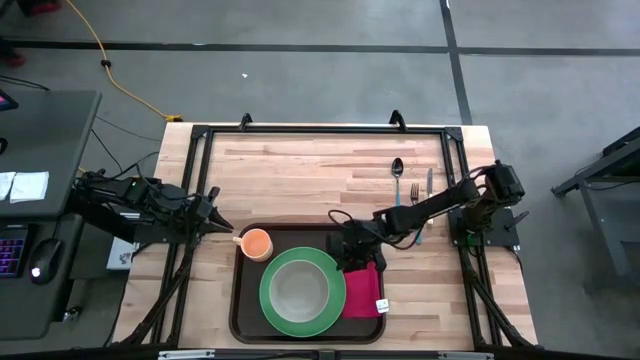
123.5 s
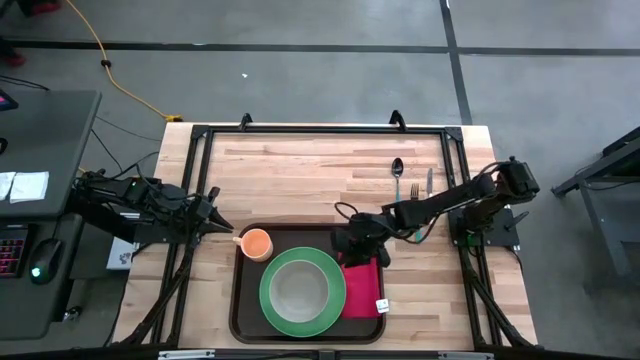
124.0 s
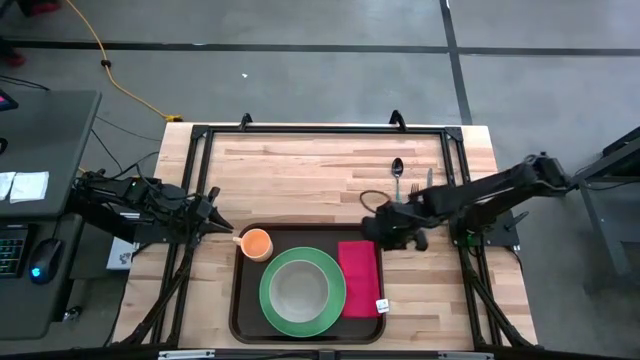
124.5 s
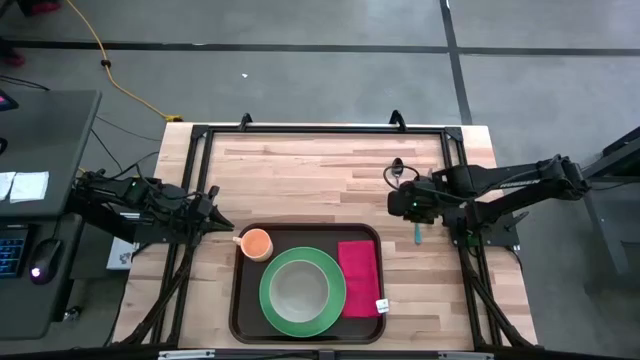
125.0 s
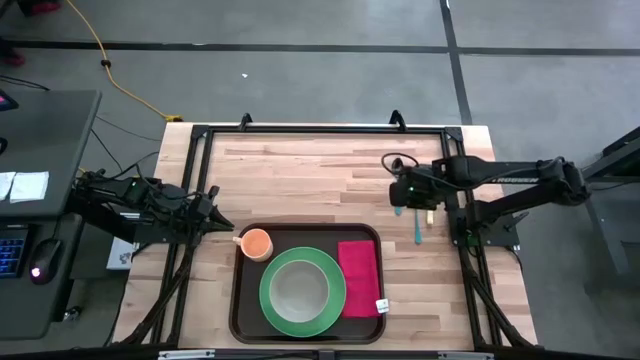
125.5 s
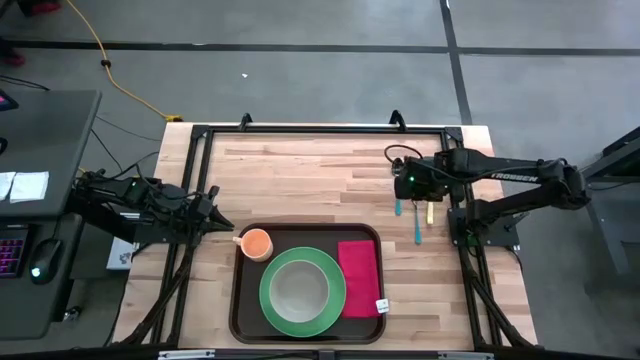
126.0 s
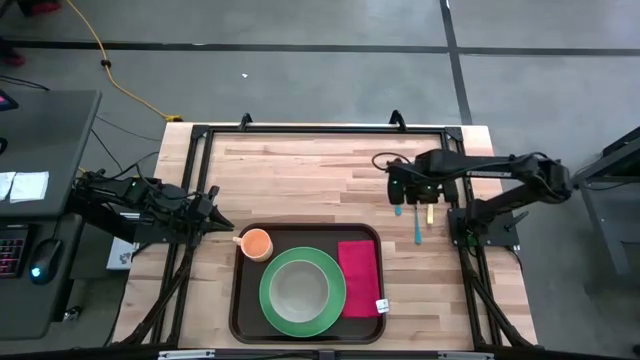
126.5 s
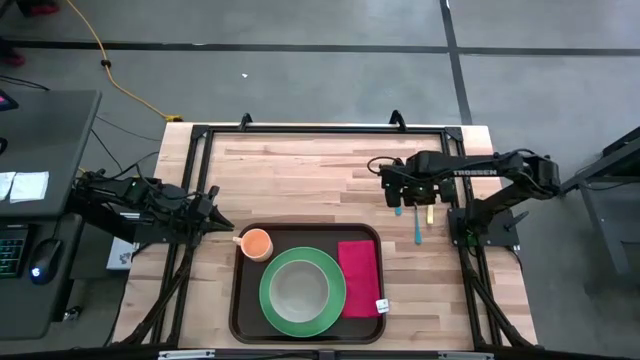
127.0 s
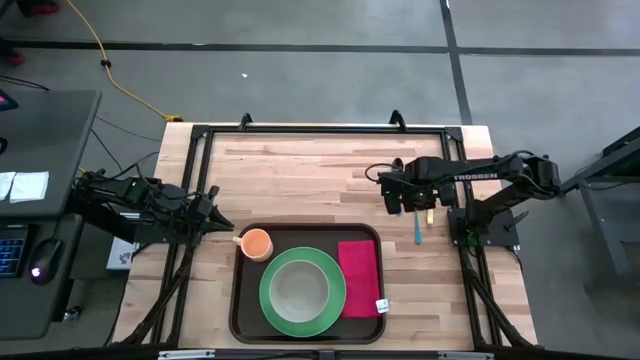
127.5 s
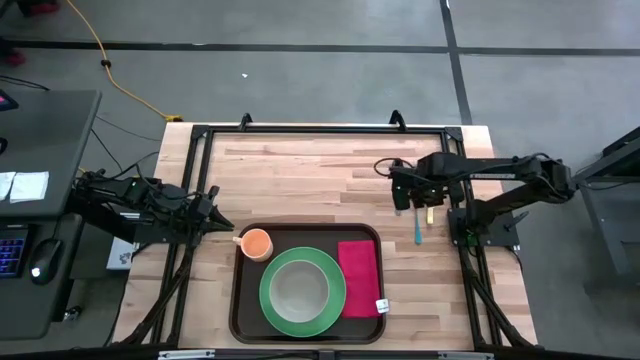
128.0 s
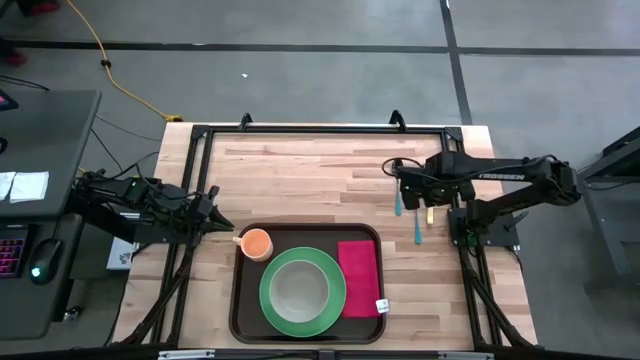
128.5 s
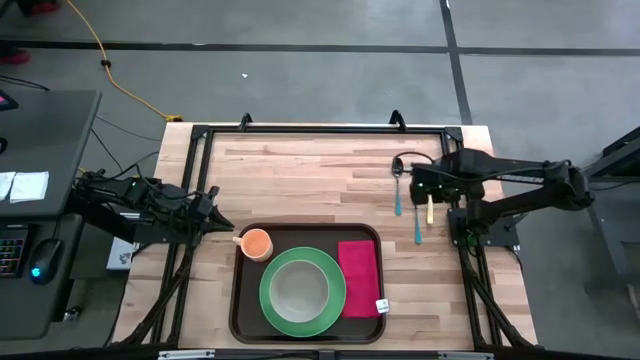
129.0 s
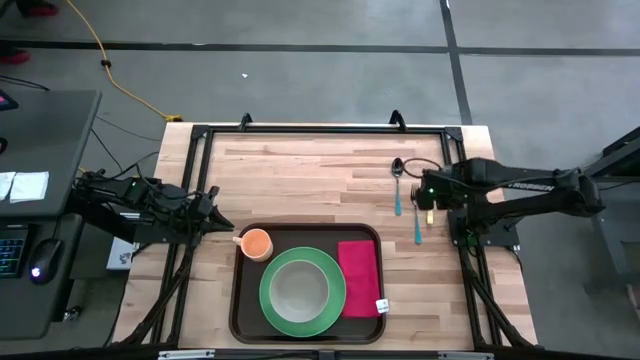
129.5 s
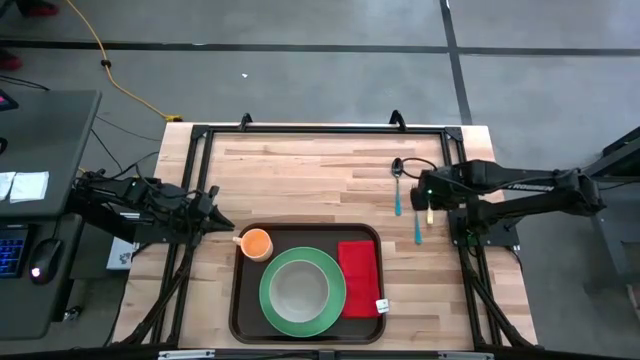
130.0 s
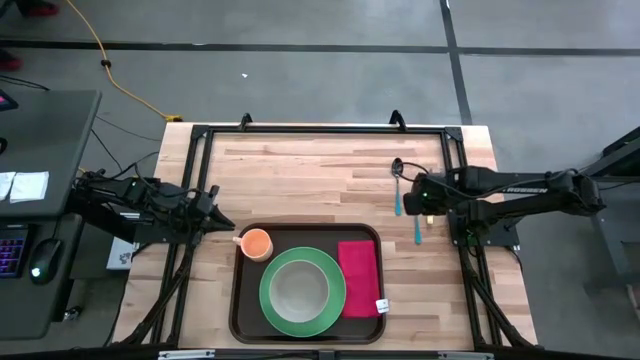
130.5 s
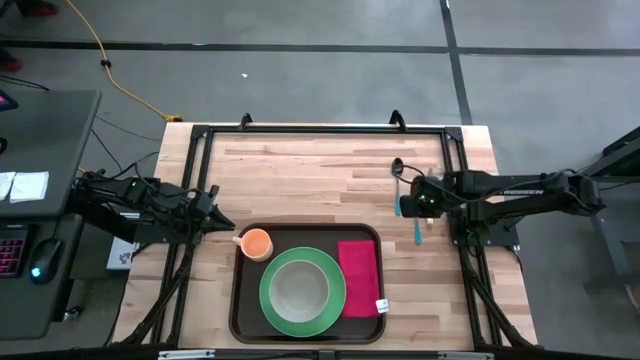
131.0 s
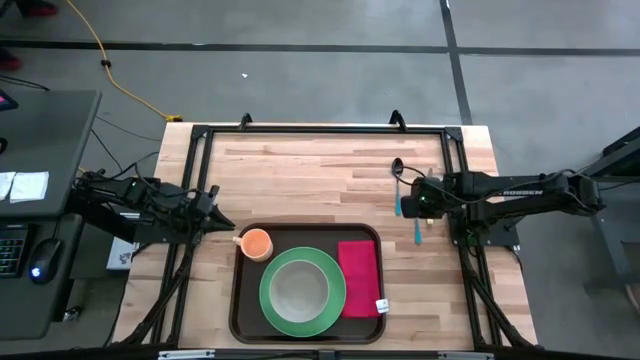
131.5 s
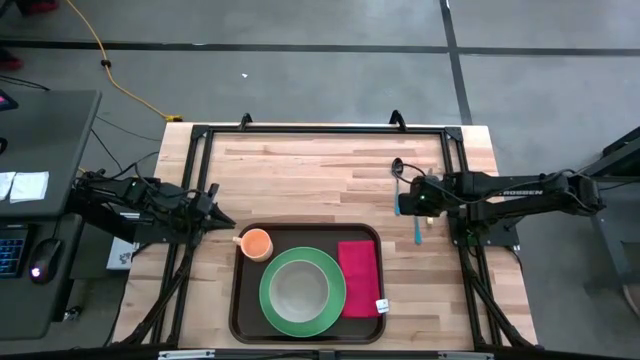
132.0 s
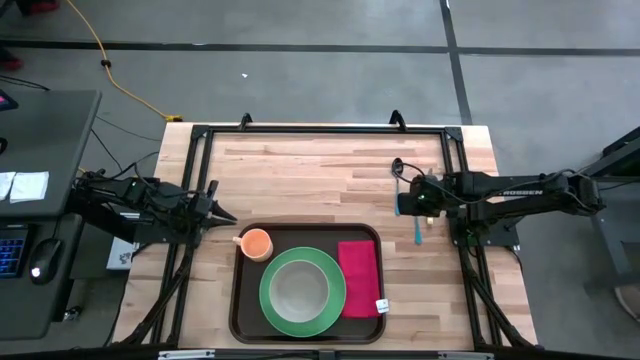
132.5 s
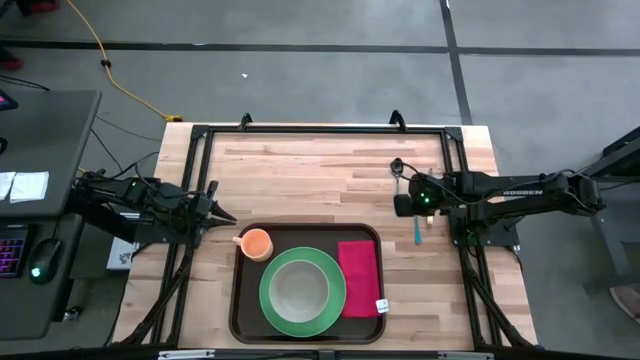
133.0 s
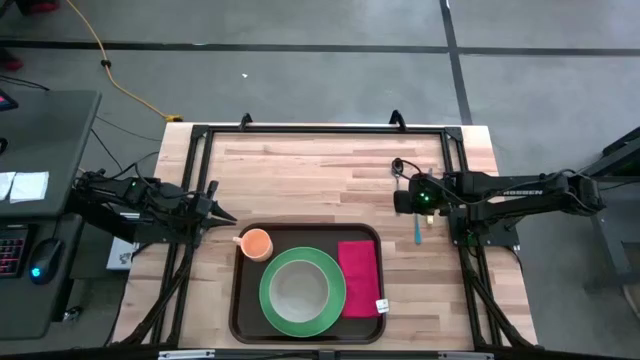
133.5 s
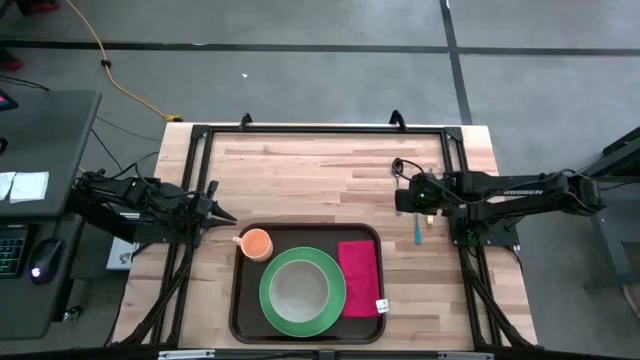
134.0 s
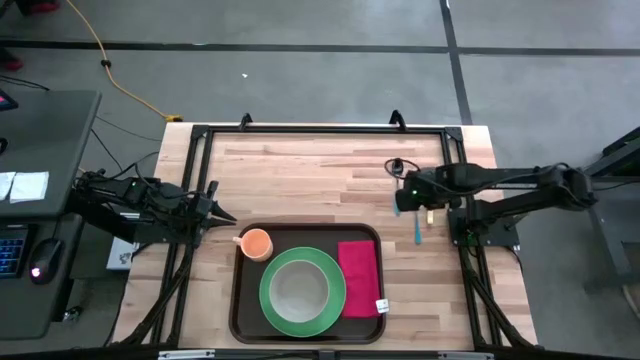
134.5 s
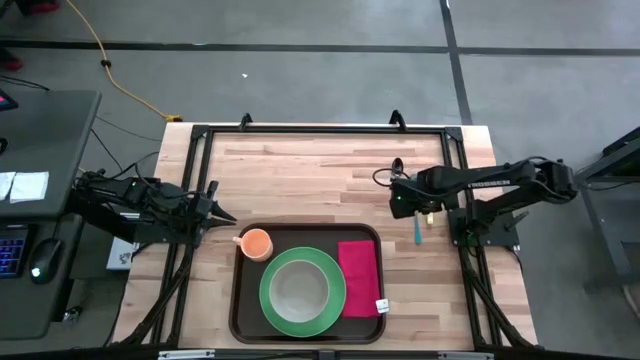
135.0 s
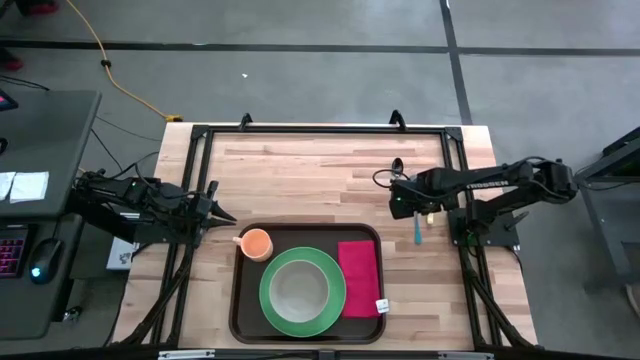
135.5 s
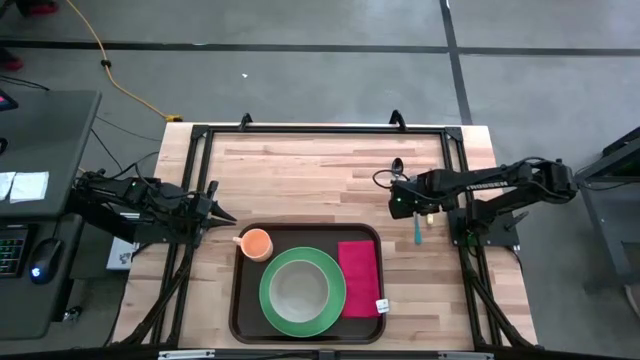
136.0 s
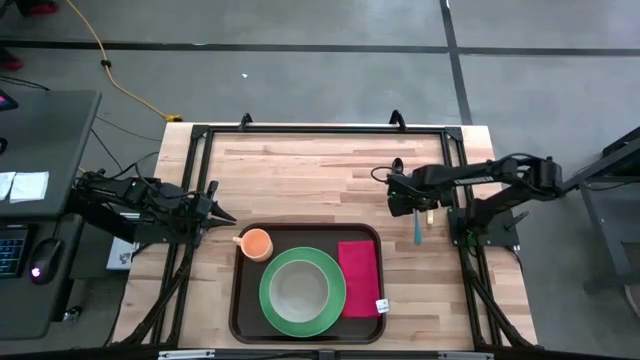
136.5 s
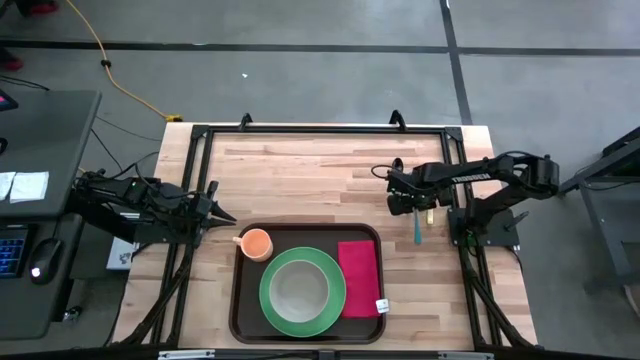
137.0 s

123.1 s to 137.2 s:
Task: Set up tray
Put the blue fork on top of the red napkin on the brown tray

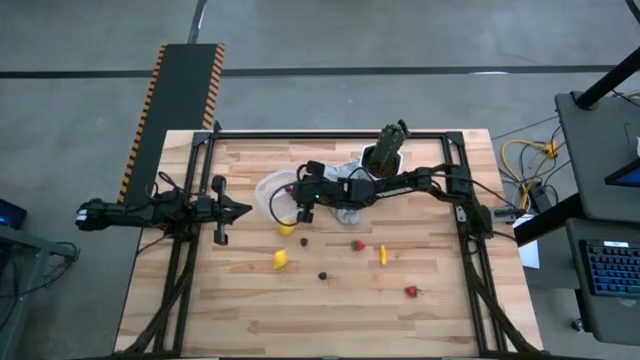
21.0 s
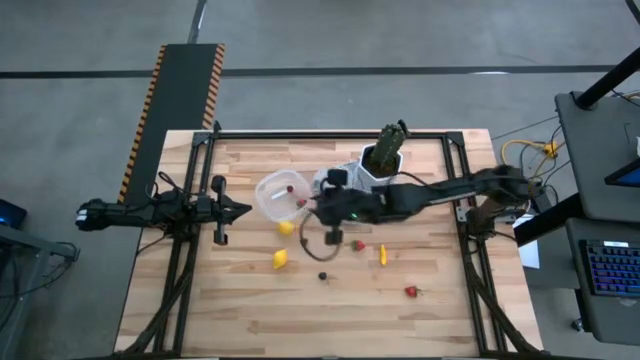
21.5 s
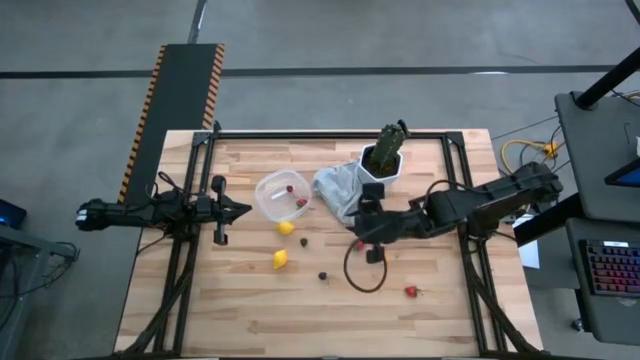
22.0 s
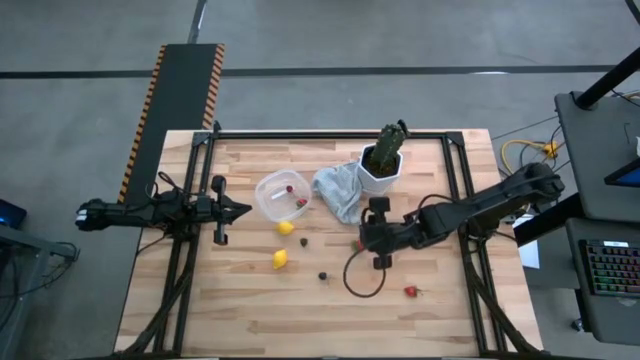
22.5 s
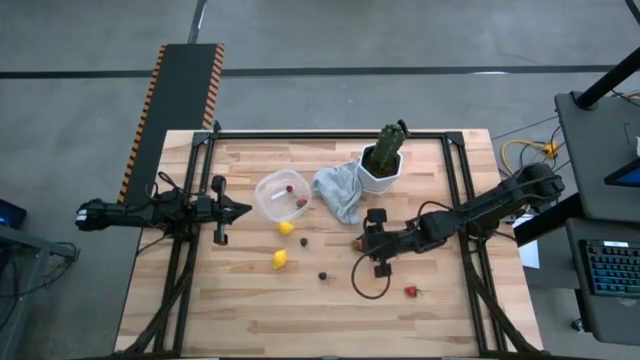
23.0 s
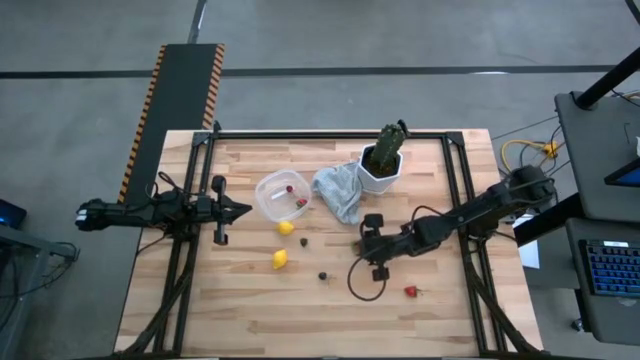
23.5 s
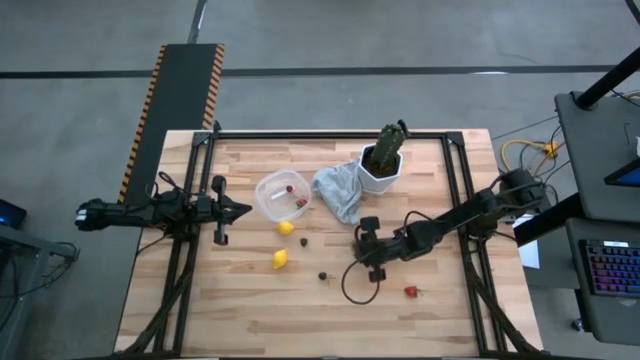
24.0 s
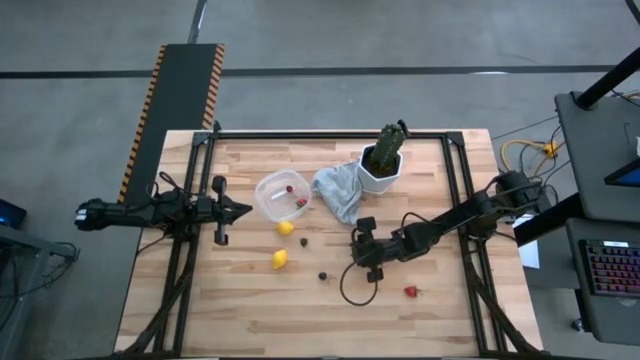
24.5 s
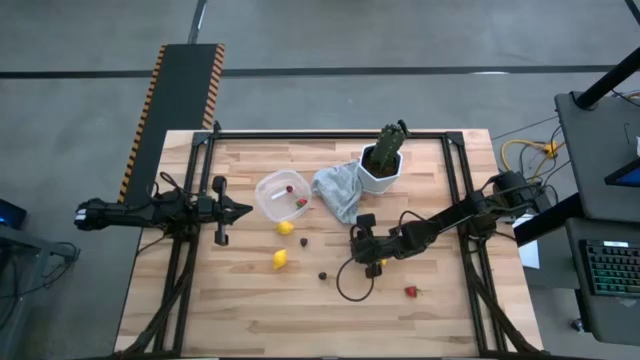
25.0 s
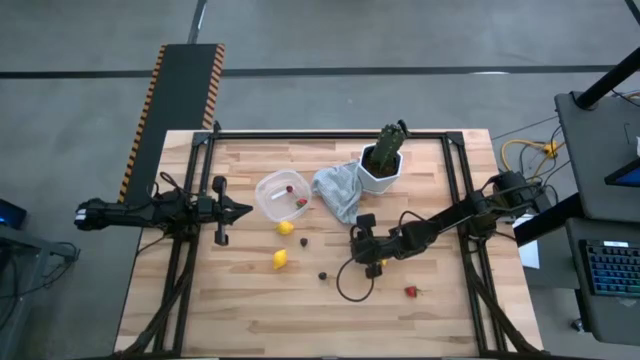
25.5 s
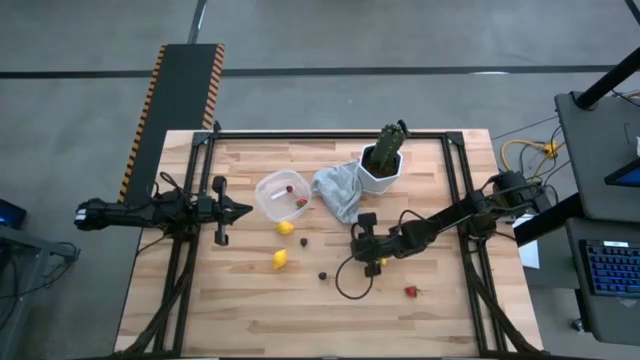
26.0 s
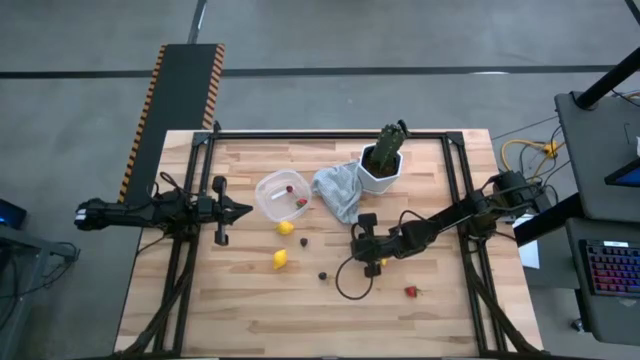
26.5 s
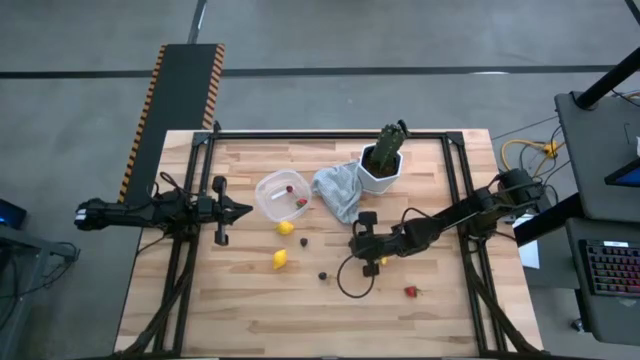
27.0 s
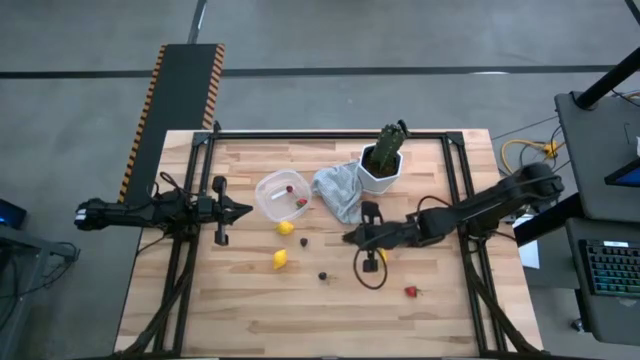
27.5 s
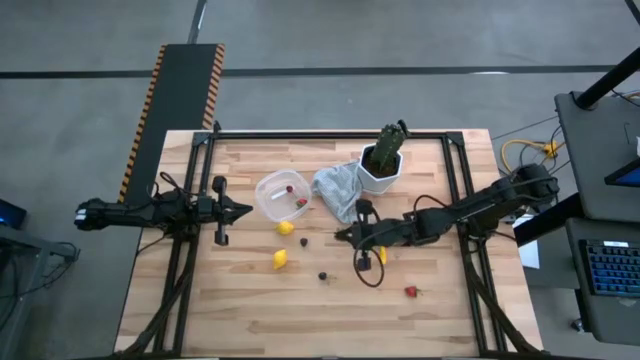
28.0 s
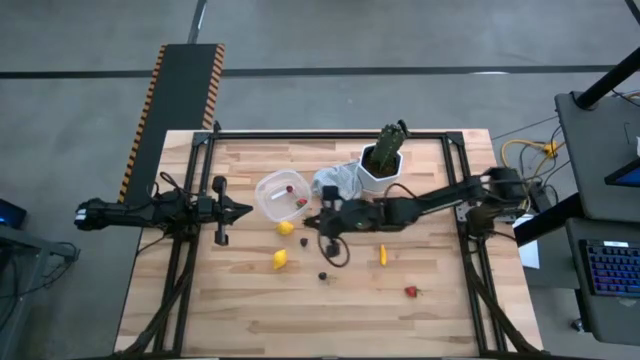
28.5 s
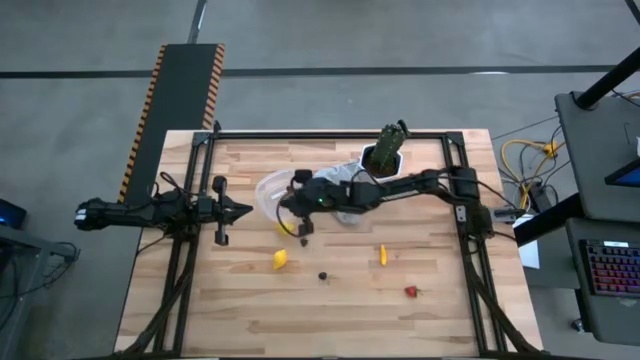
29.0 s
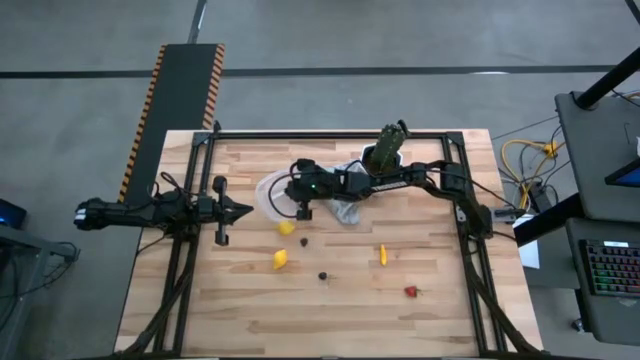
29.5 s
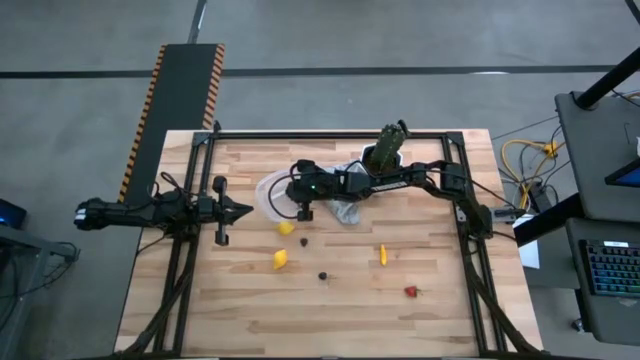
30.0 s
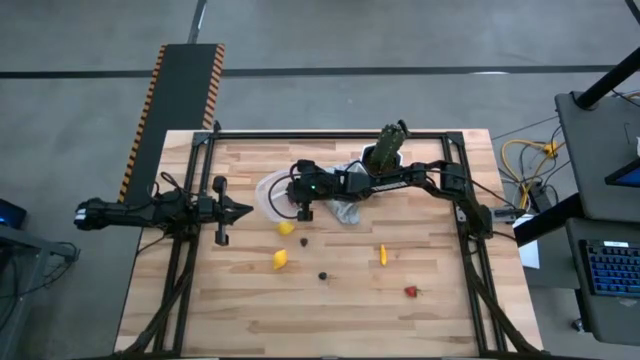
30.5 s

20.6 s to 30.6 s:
Task: Pick and placing Produce into tupperware
Put the top red strawberry into the transparent container
